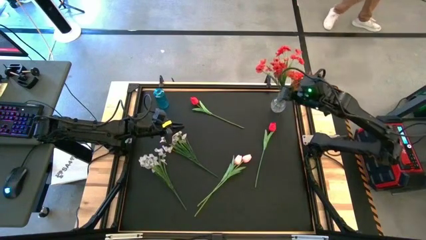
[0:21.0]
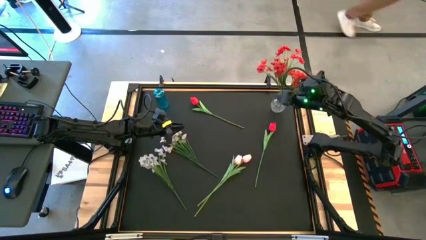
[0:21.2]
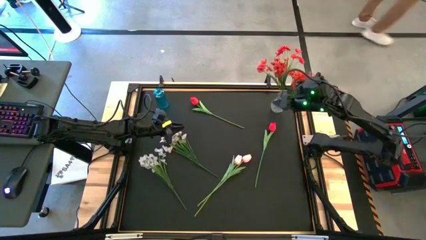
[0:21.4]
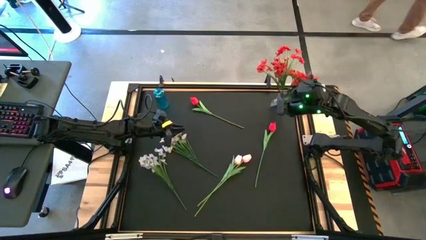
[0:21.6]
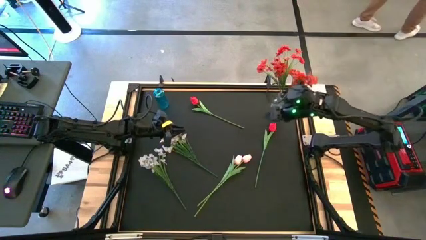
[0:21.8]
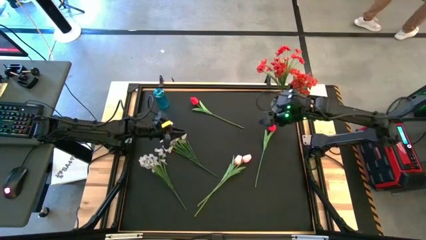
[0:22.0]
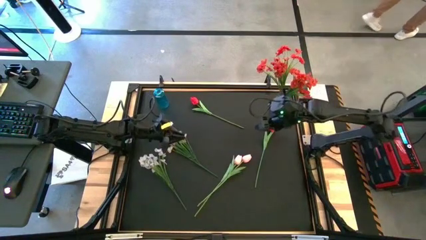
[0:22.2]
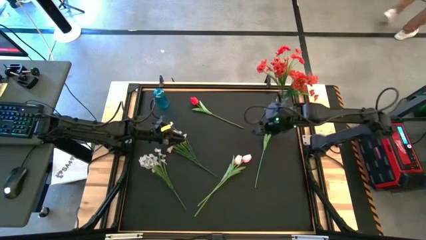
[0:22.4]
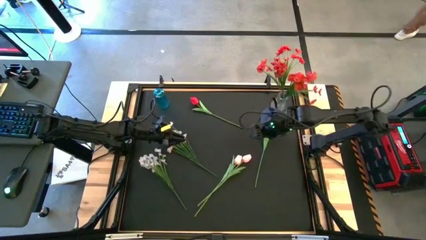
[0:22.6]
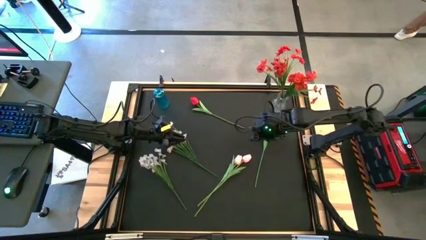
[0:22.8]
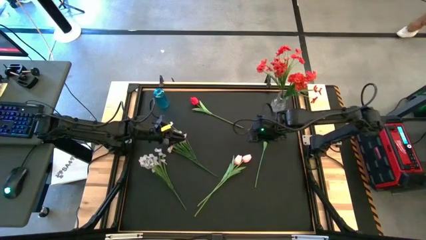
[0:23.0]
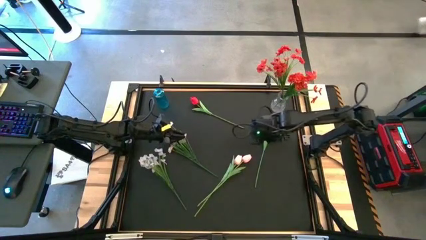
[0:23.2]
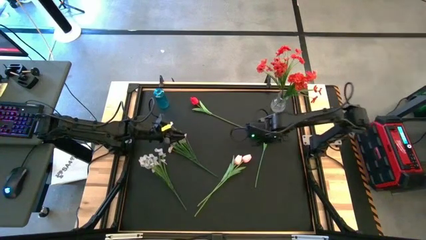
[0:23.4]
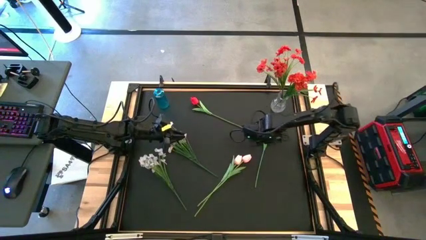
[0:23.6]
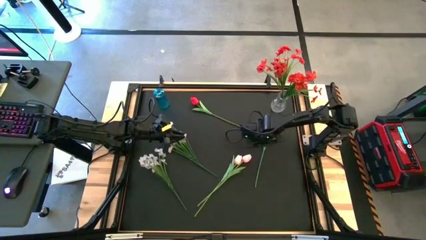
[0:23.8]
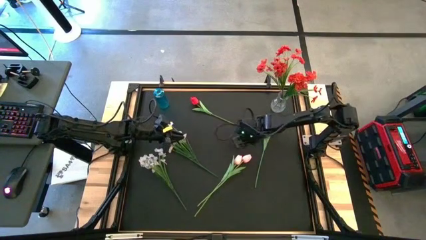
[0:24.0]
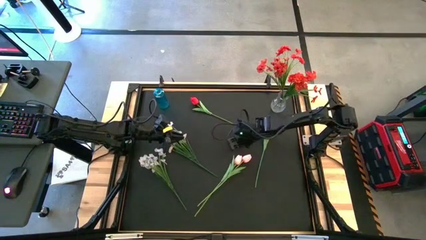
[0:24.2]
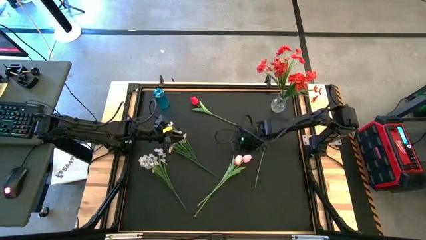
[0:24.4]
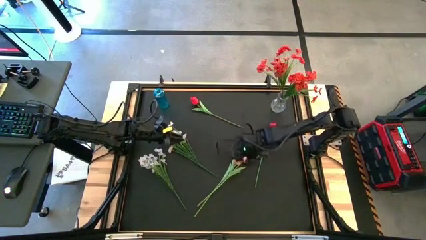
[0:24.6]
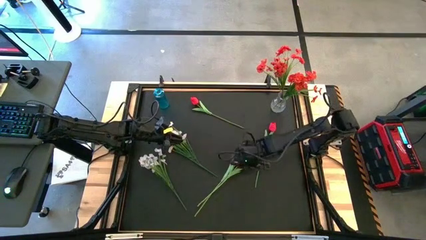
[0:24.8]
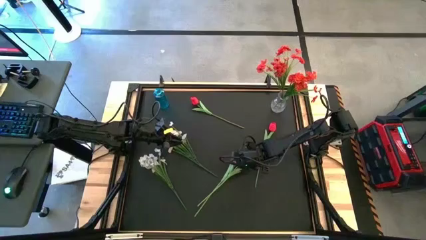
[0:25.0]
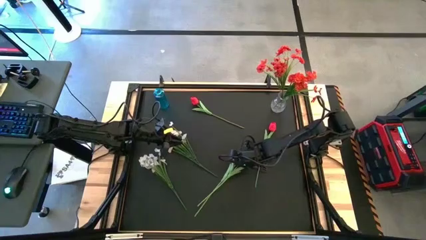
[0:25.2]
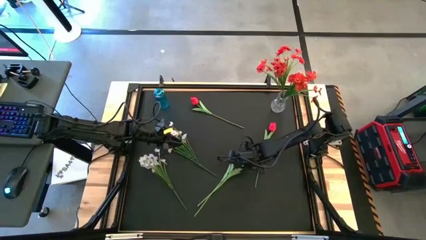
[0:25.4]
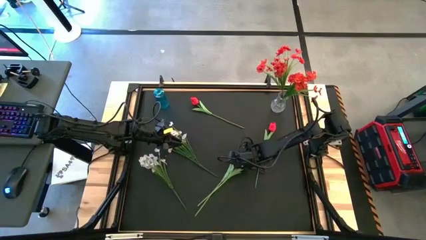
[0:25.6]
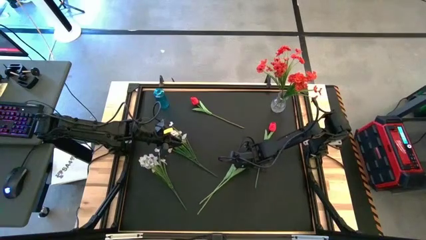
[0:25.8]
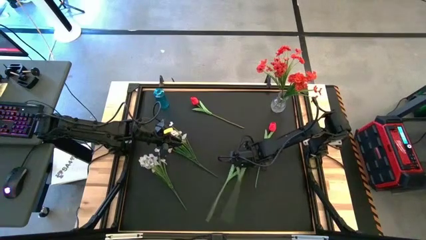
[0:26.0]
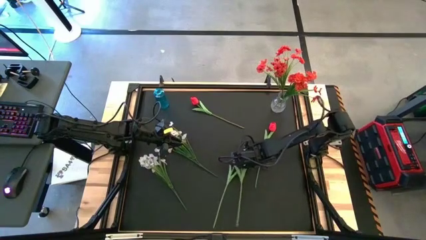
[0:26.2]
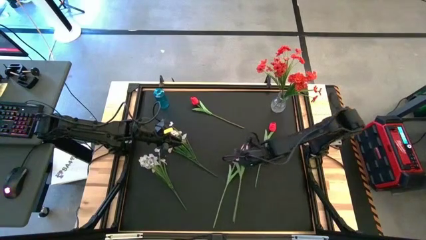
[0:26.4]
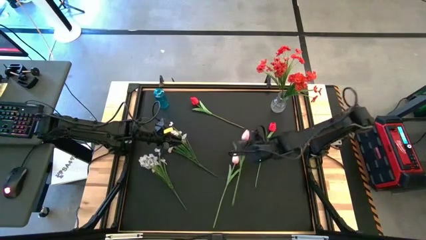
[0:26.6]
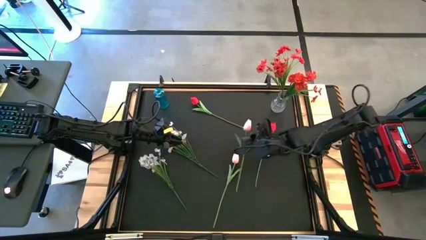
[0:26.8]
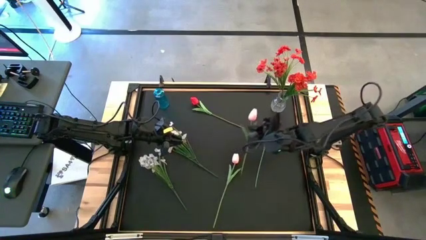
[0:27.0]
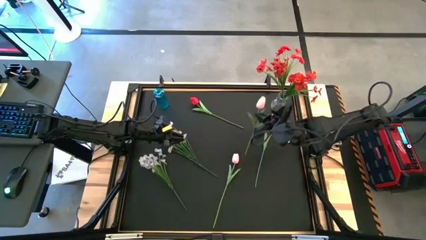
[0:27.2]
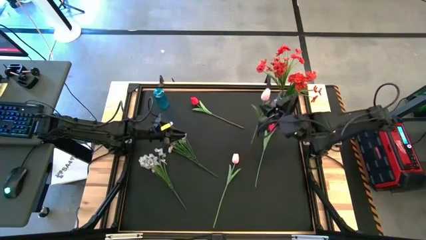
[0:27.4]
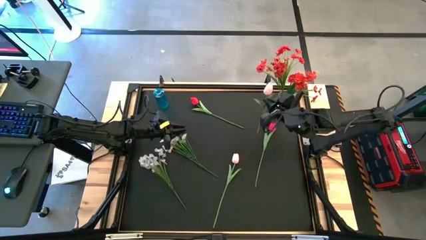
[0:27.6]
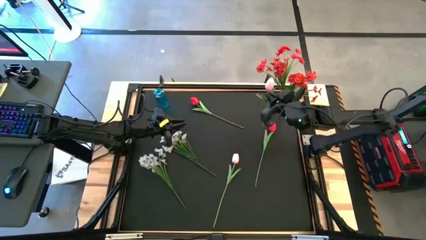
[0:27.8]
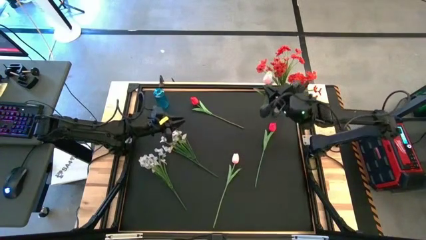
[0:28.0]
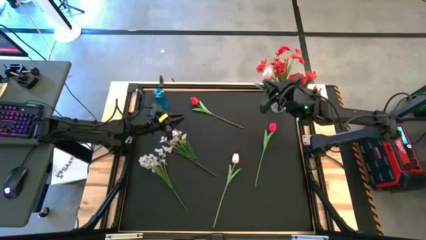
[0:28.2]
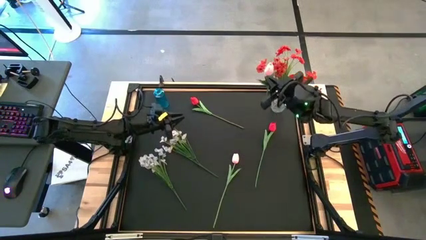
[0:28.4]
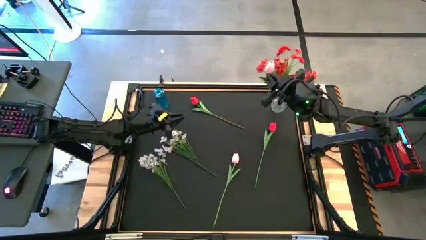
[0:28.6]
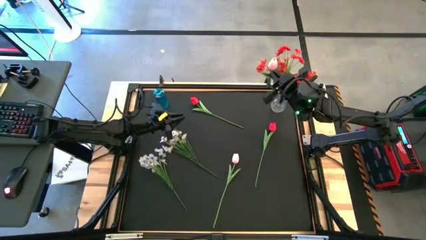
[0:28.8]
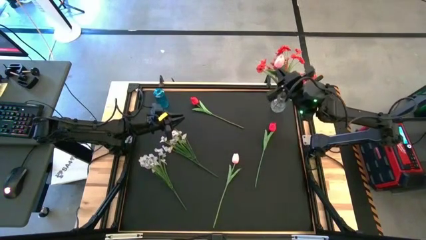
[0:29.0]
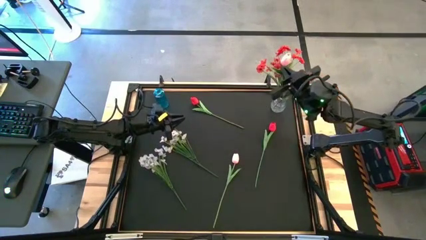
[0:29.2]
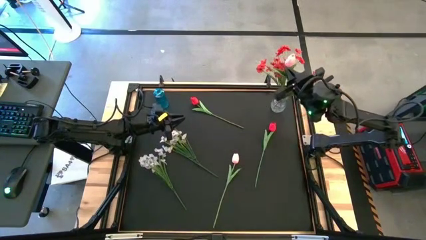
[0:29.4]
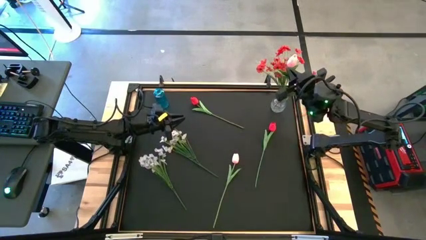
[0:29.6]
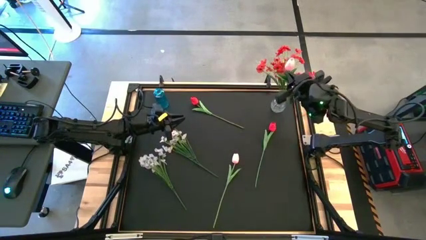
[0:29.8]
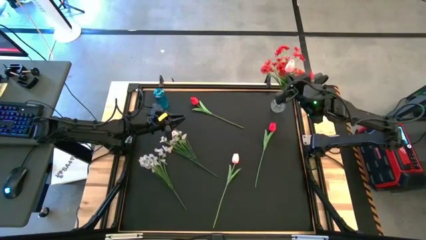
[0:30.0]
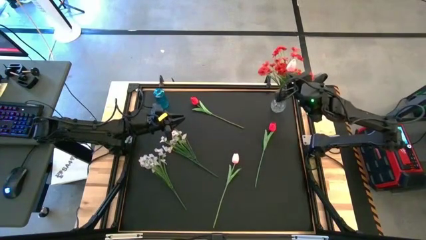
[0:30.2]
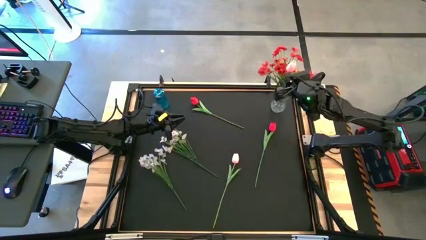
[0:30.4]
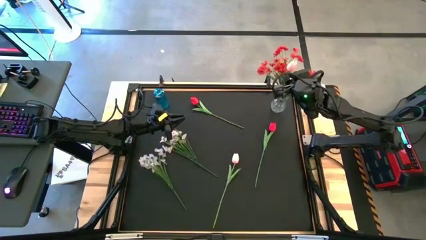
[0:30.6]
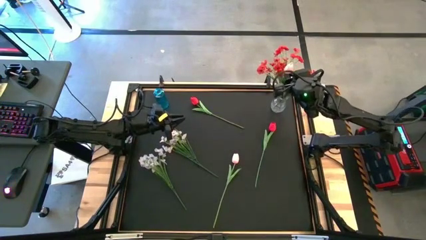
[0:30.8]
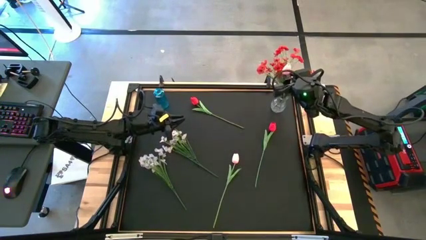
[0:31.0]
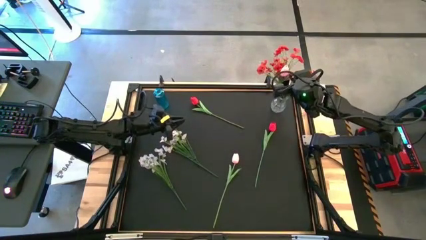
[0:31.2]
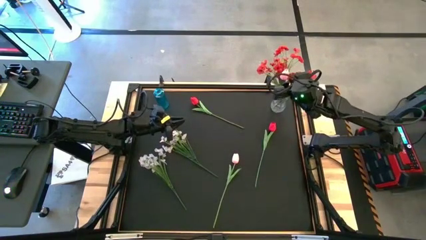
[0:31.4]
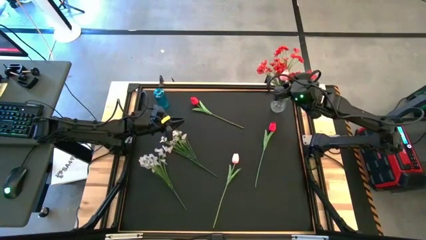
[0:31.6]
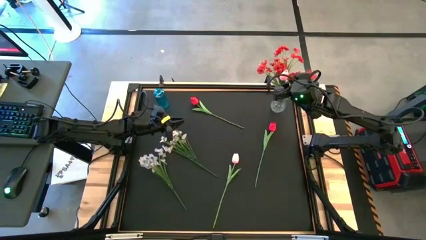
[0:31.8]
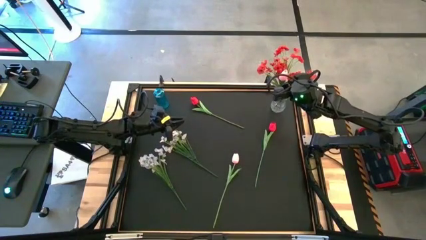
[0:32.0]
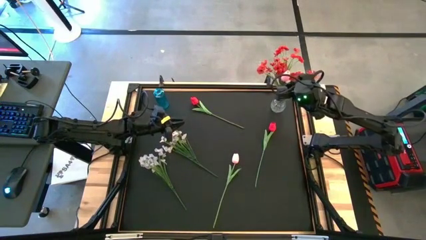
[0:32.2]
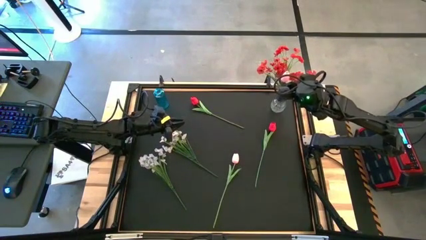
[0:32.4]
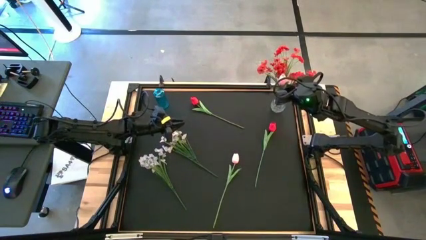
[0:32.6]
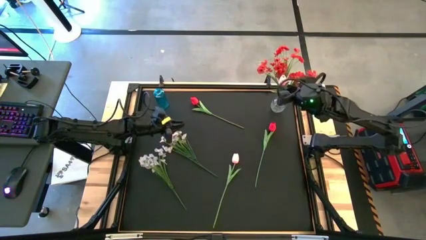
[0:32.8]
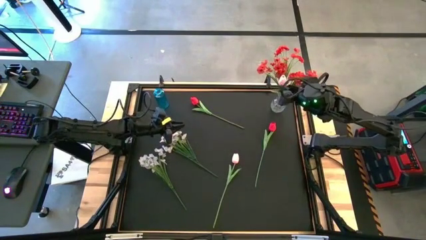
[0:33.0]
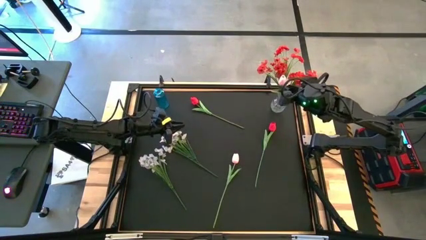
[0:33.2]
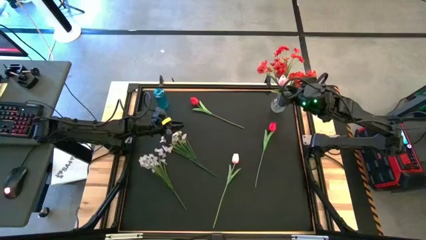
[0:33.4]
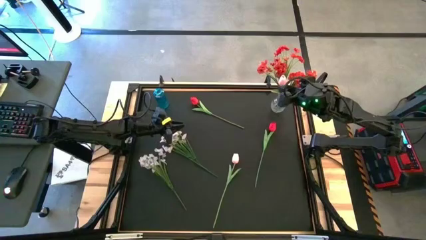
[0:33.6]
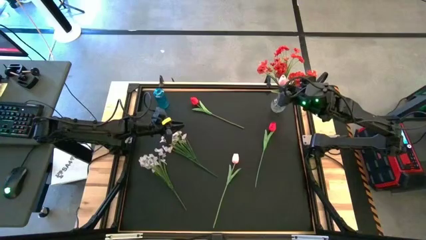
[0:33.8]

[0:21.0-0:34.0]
Task: Sort flowers into vase by color
Put the right pink flower into the transparent vase
